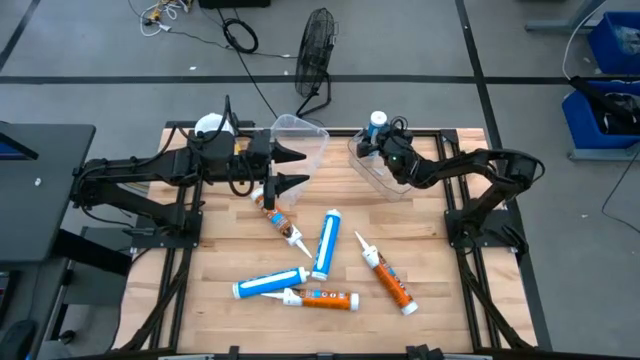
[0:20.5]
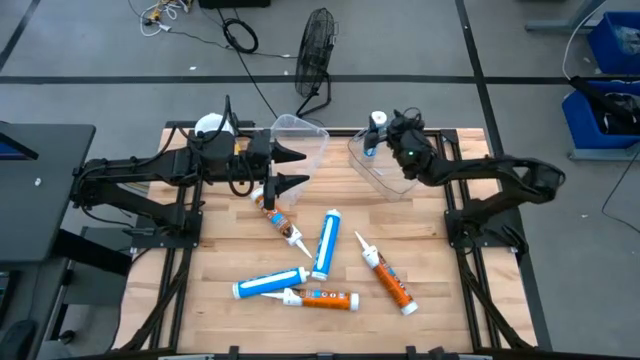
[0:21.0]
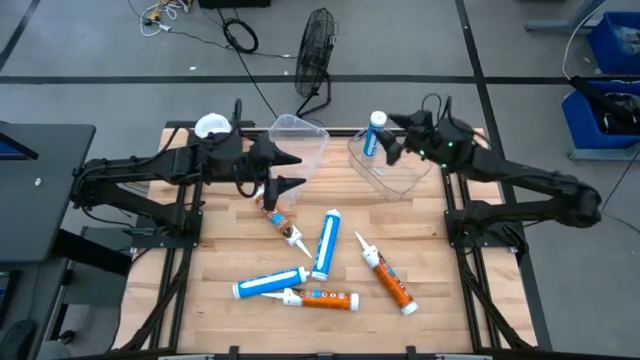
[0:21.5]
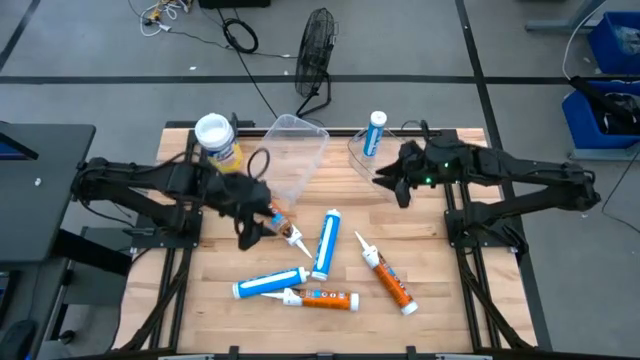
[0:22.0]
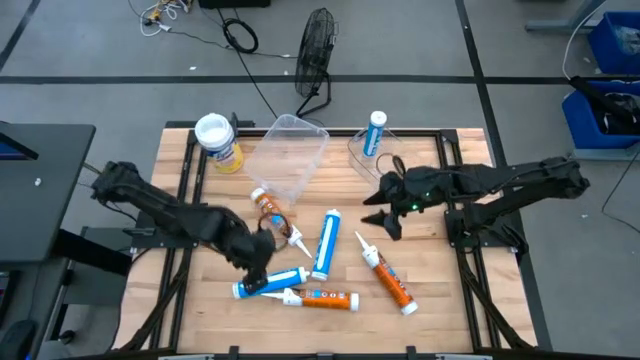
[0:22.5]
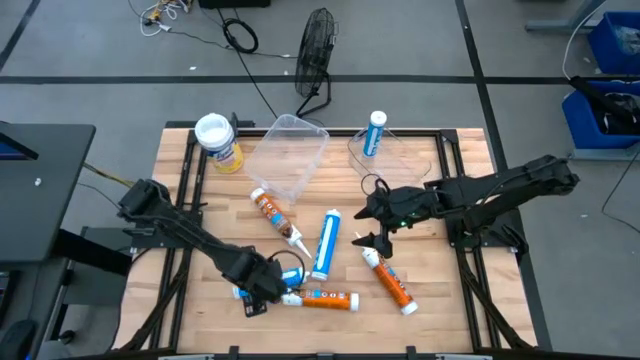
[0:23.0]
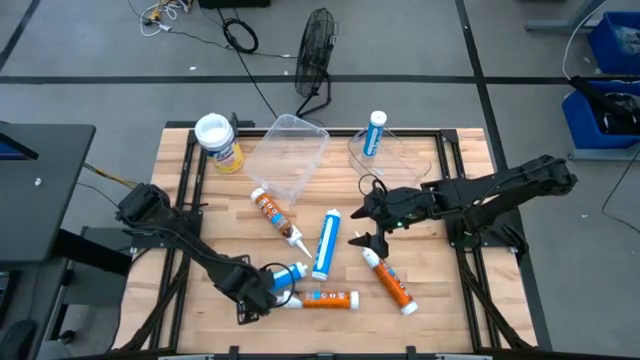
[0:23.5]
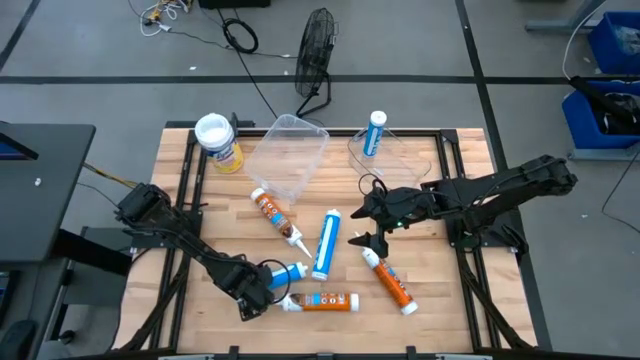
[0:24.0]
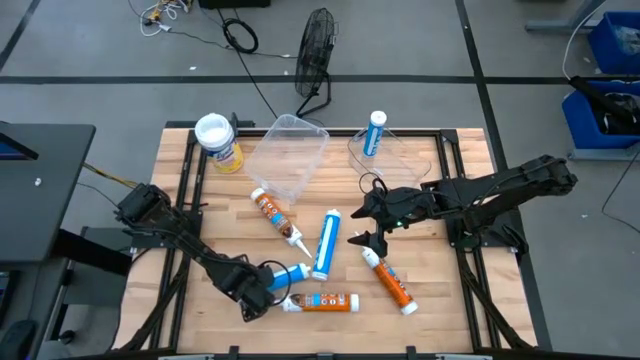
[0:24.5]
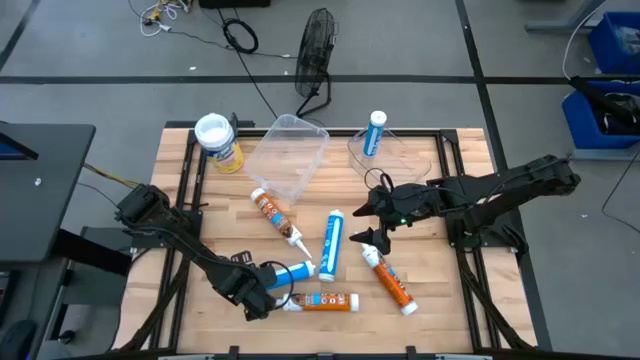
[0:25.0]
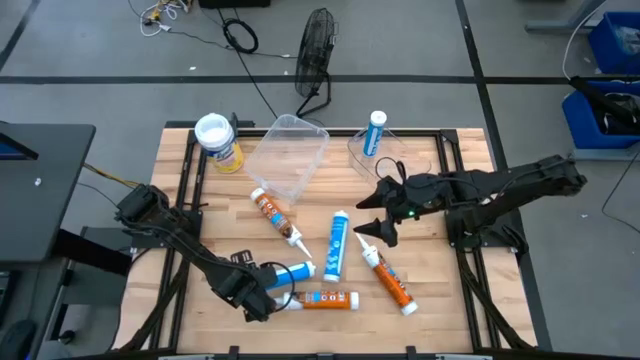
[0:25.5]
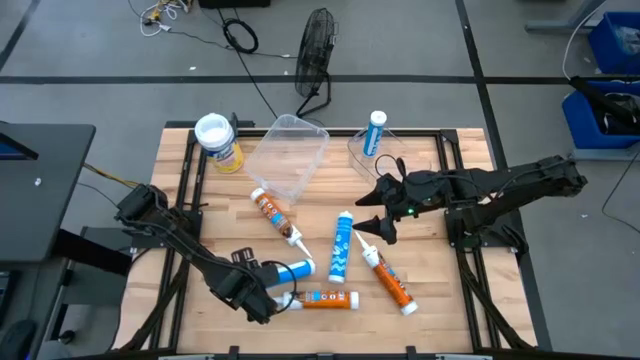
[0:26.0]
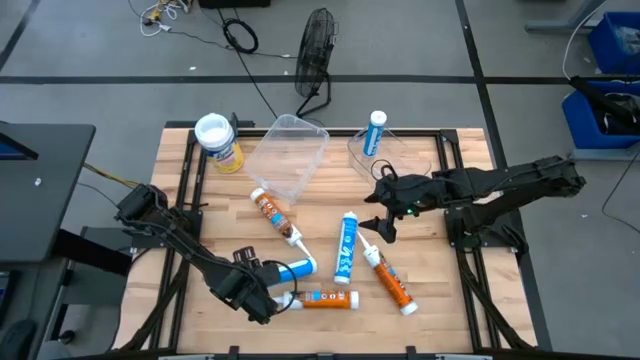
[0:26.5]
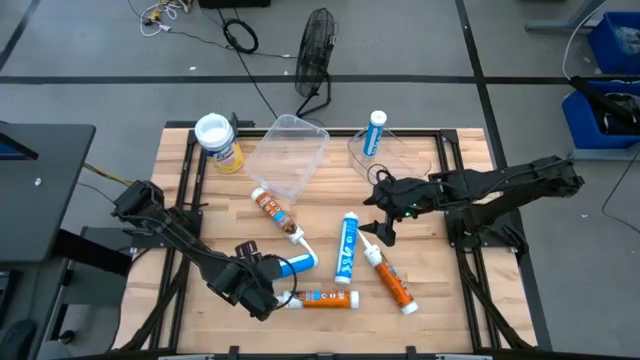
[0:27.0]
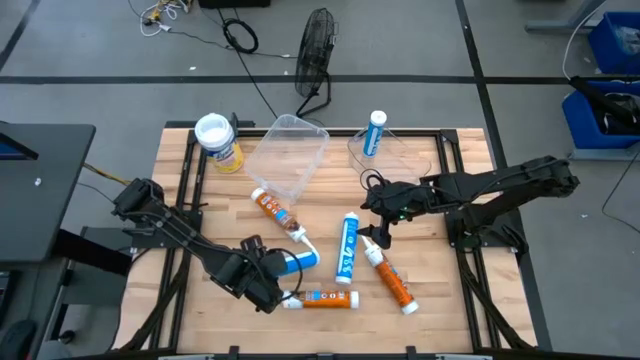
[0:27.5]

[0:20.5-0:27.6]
Task: Pick & place silicon tubes, Sealant and Lysol wipes
Put the left blue sealant into the right transparent bin

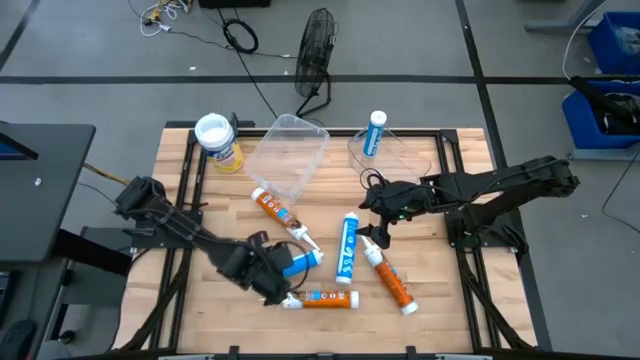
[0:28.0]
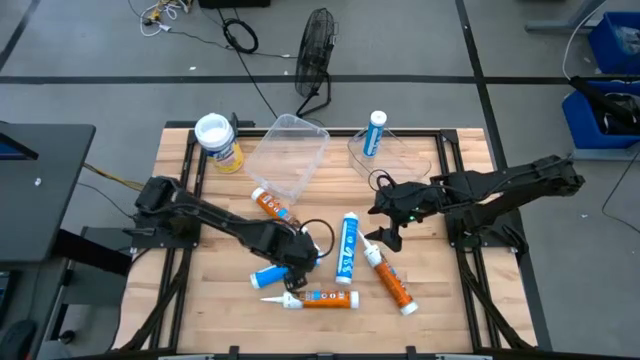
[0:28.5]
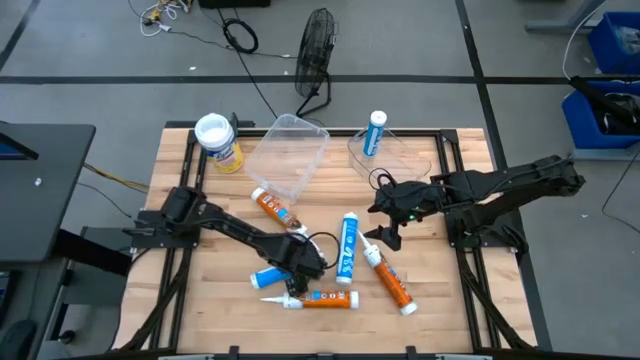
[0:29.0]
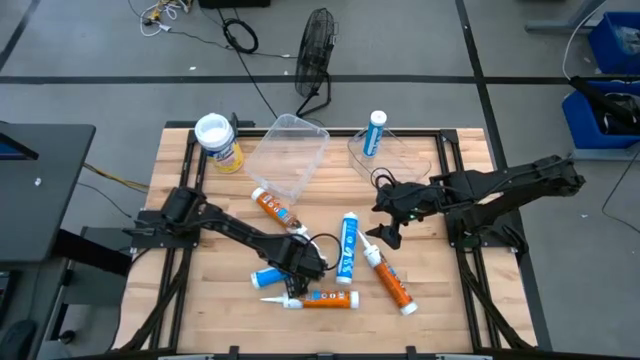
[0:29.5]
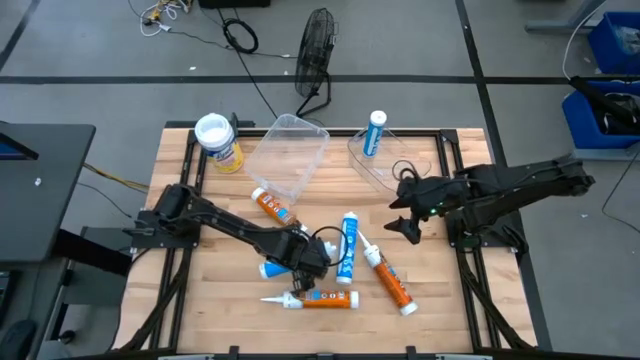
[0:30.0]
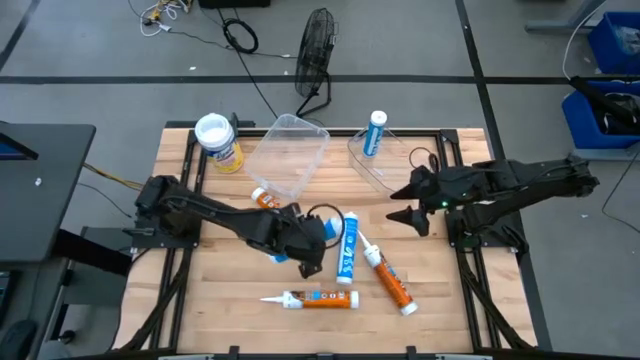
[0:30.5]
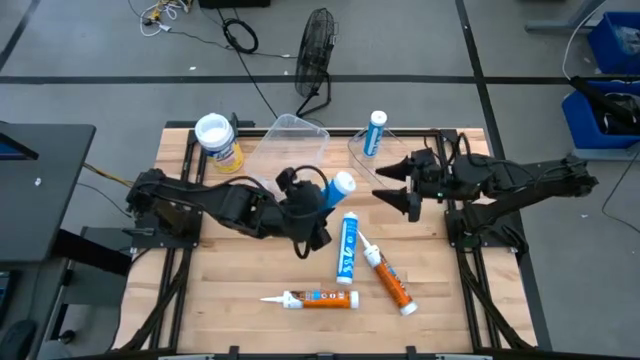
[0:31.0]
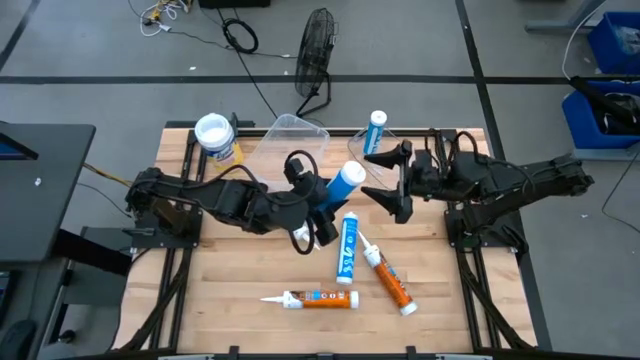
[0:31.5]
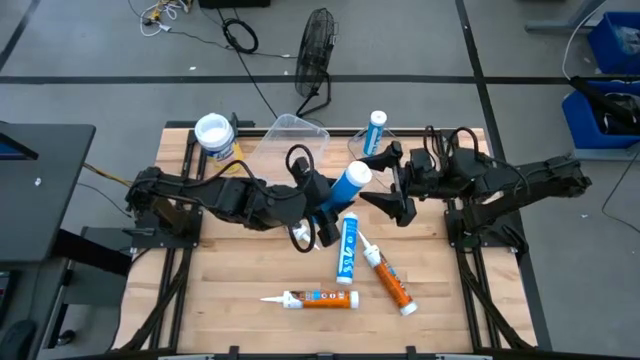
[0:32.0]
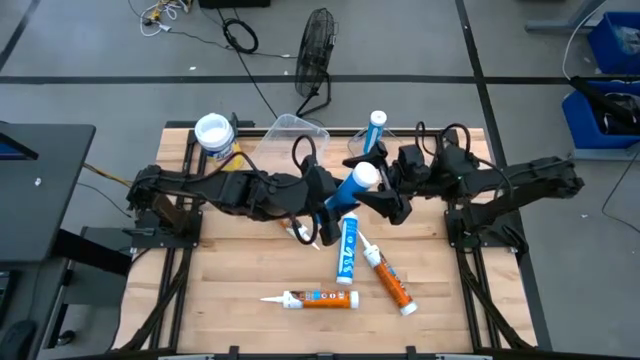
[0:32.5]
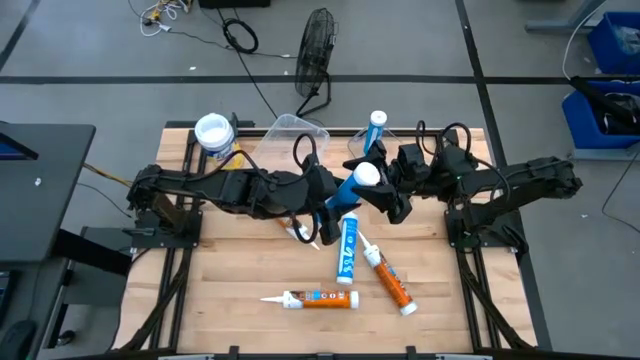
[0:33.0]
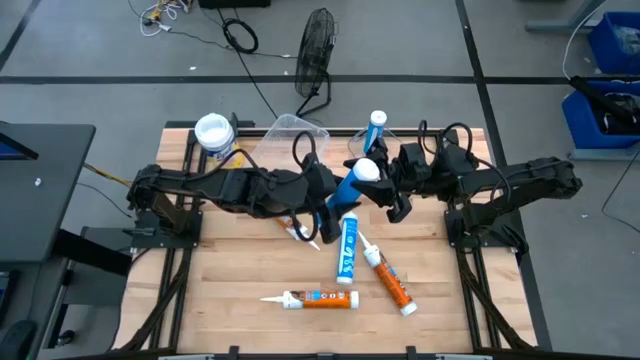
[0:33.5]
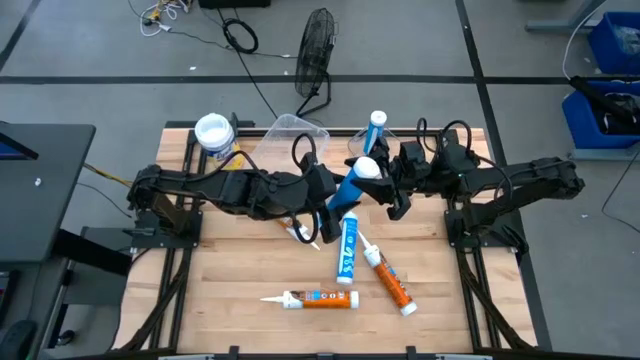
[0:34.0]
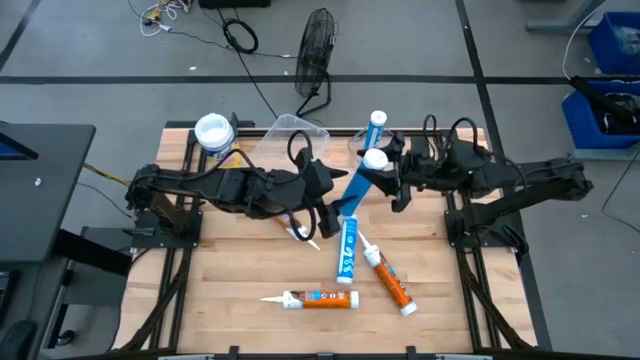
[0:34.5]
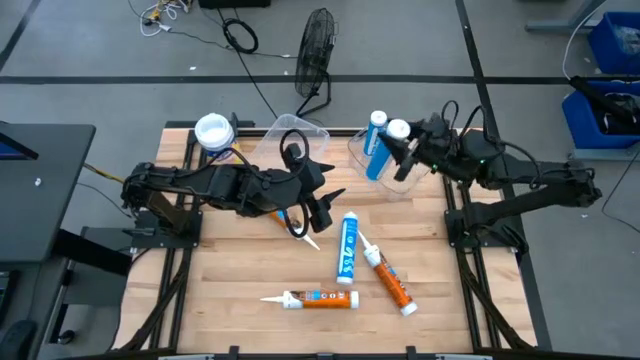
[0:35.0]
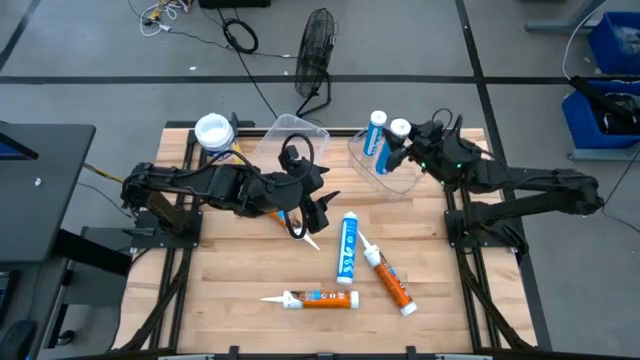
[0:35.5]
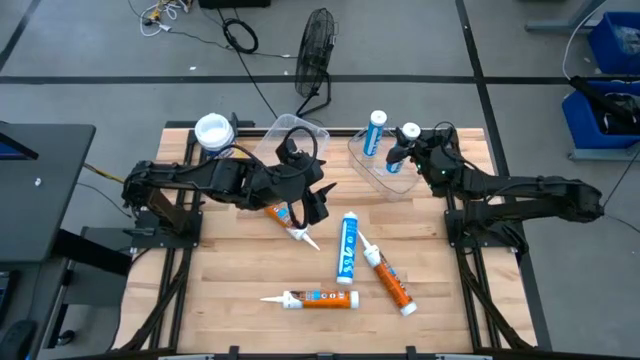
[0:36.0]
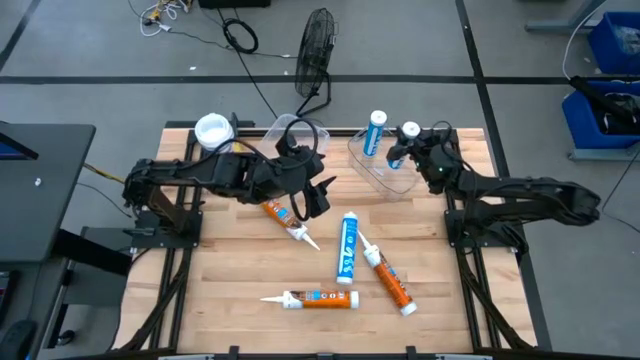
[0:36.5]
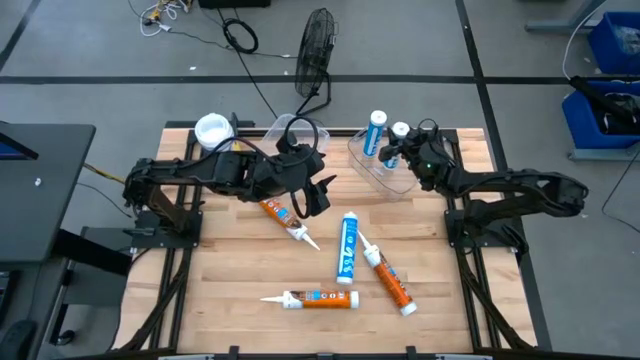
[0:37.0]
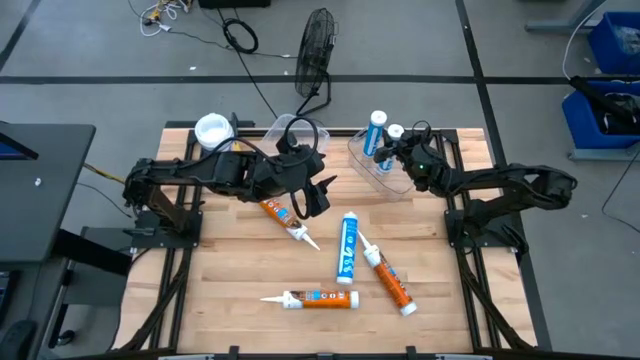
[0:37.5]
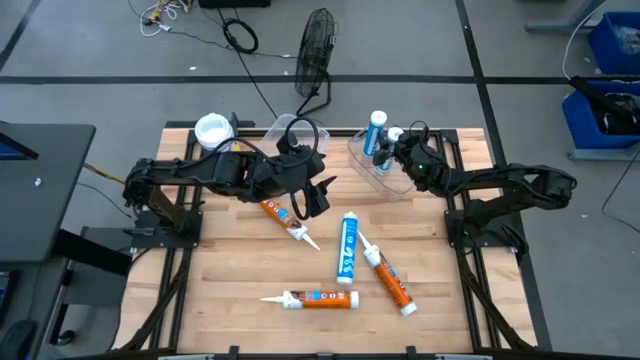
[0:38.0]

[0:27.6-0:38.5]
Put the left blue sealant into the right transparent bin

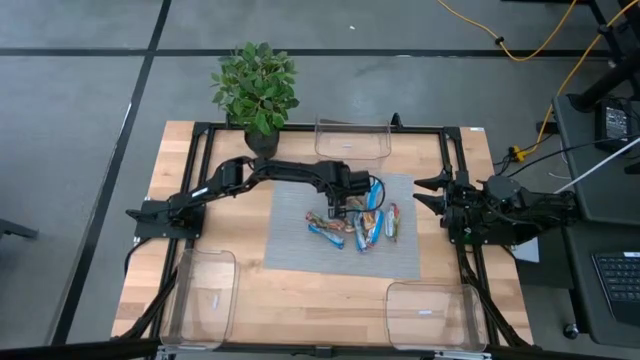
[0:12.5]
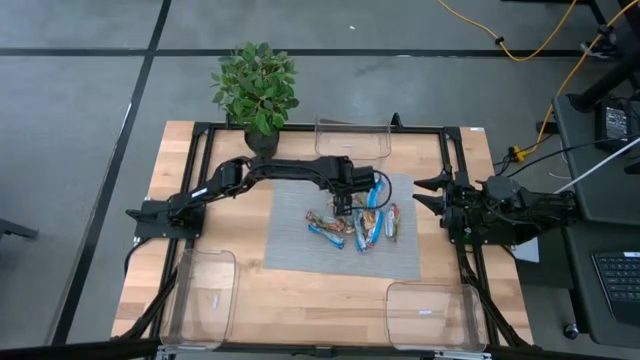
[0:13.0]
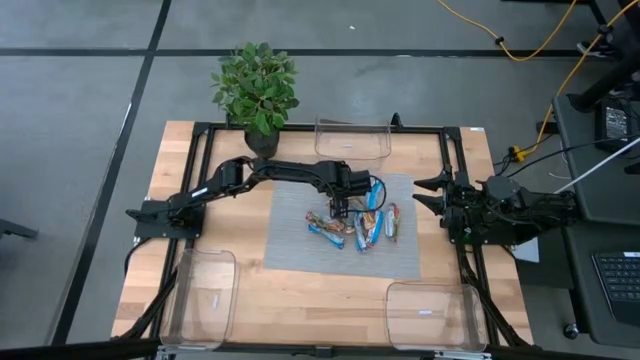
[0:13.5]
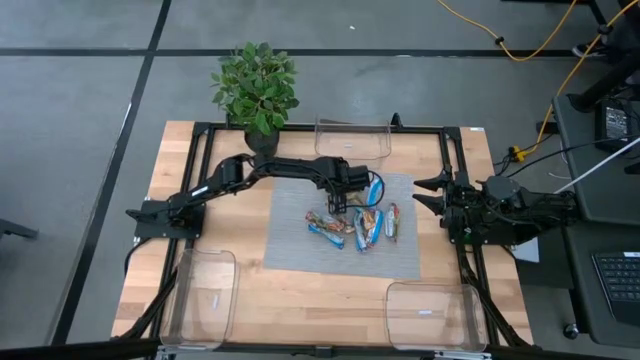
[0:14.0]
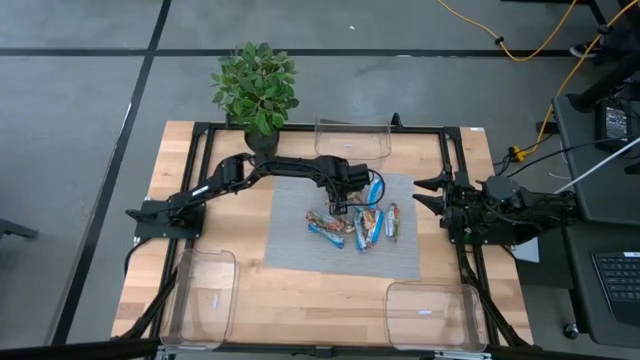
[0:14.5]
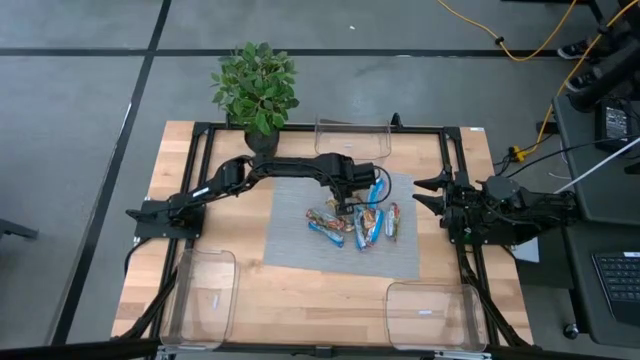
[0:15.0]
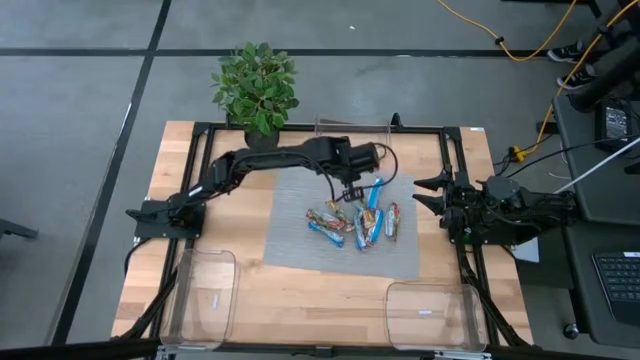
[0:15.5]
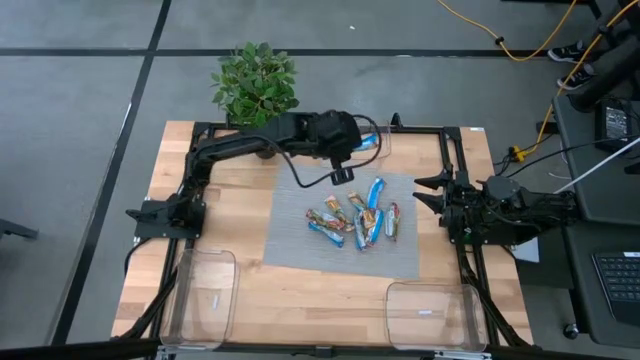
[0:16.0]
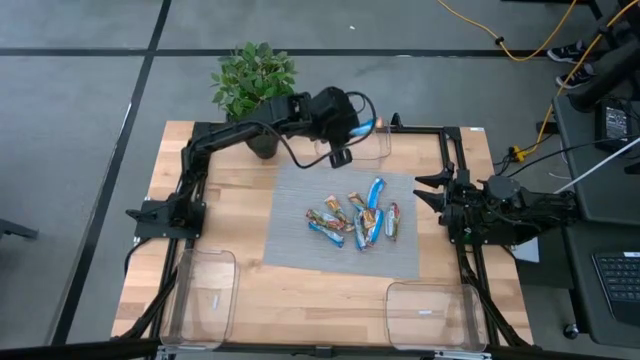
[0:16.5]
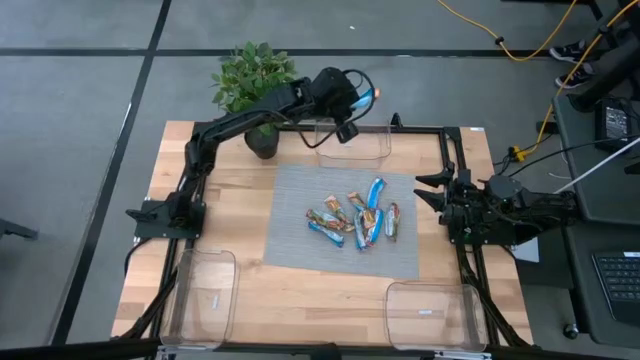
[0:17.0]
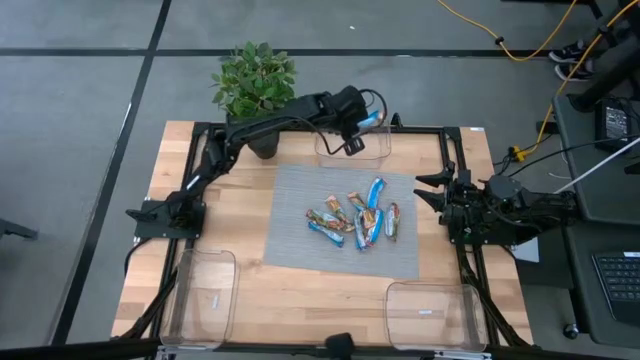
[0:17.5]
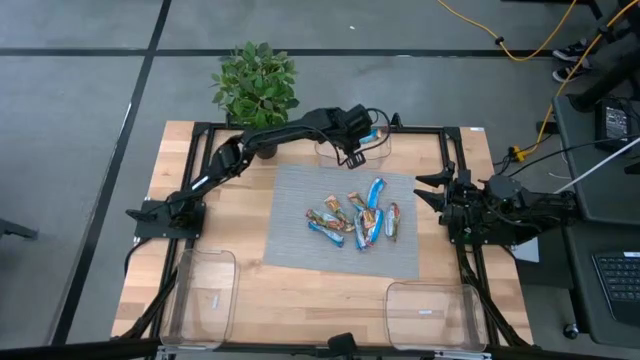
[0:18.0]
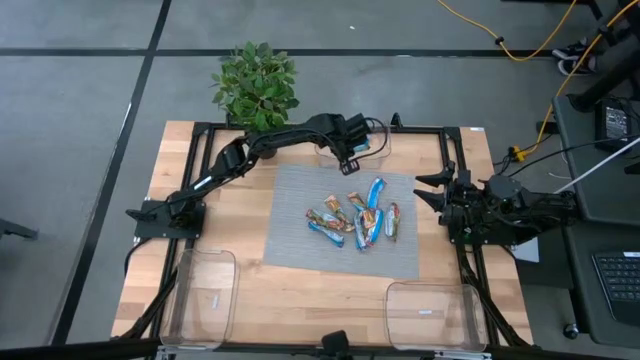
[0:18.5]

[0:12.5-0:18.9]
Task: Pick and place Granola Bars by type
Put the yellow granola bar into the top transparent bin
